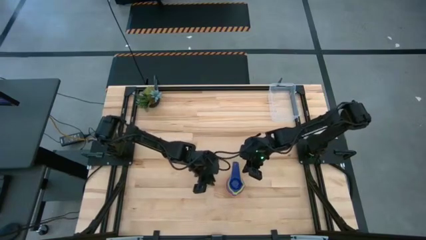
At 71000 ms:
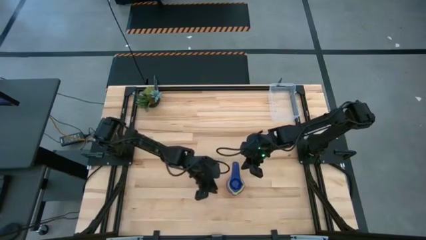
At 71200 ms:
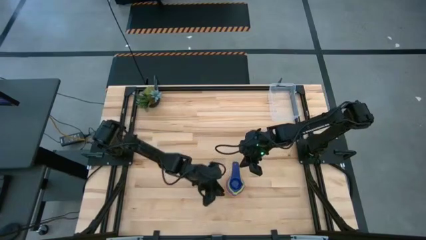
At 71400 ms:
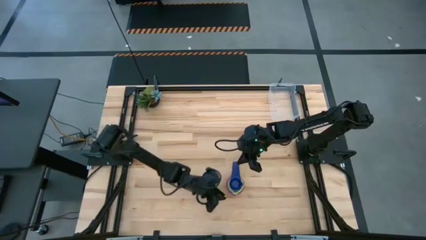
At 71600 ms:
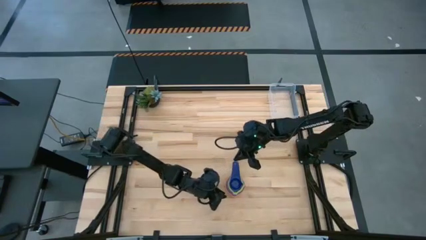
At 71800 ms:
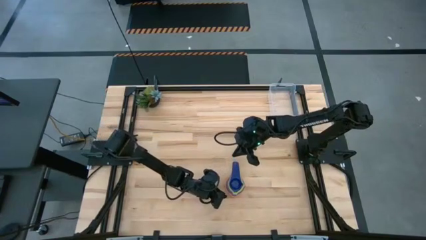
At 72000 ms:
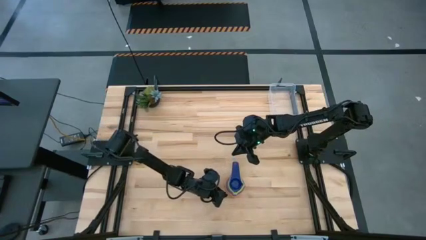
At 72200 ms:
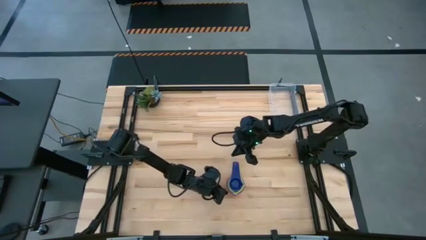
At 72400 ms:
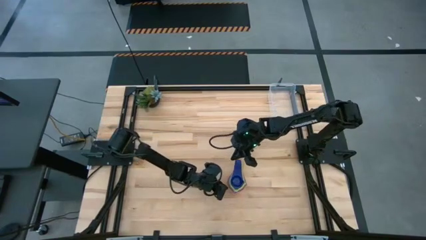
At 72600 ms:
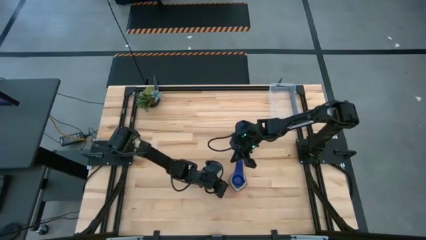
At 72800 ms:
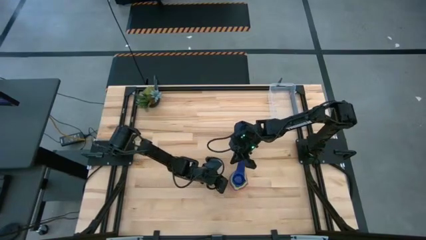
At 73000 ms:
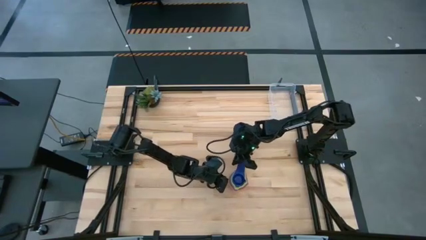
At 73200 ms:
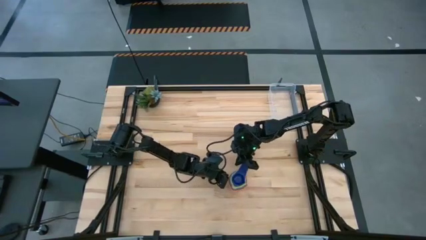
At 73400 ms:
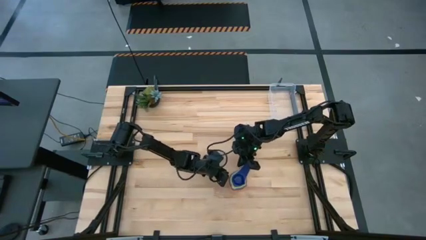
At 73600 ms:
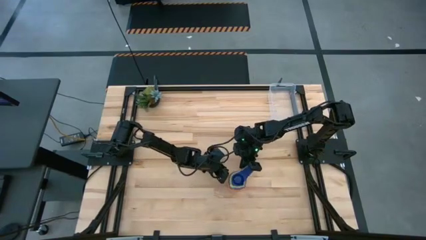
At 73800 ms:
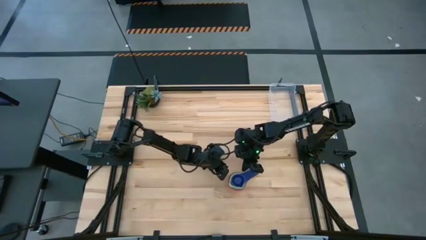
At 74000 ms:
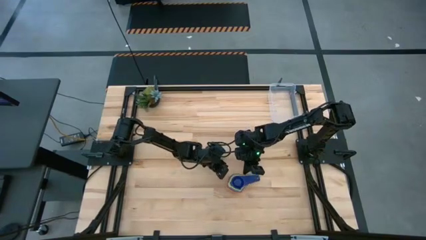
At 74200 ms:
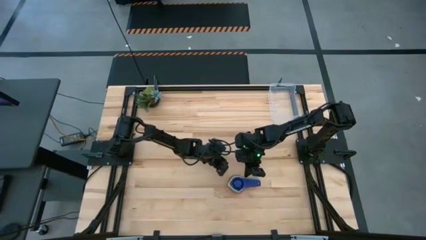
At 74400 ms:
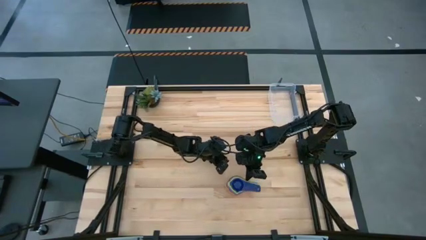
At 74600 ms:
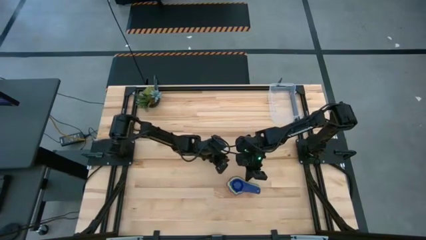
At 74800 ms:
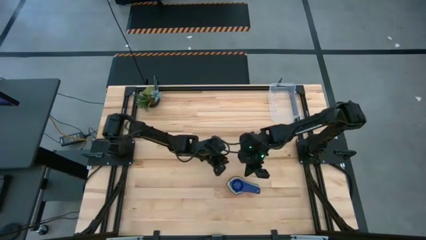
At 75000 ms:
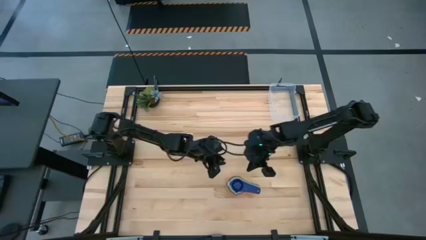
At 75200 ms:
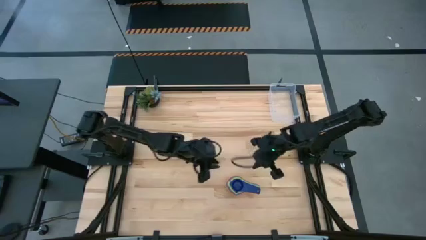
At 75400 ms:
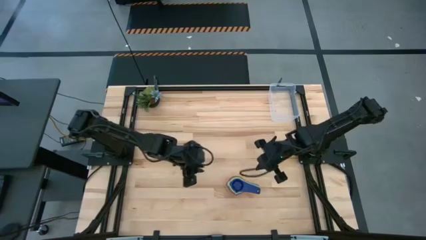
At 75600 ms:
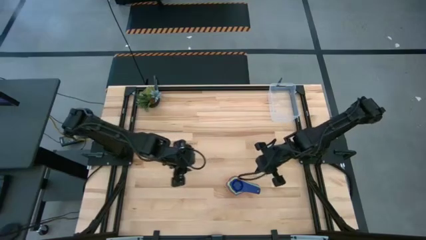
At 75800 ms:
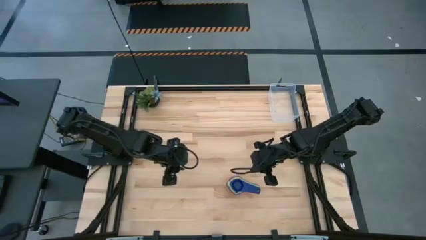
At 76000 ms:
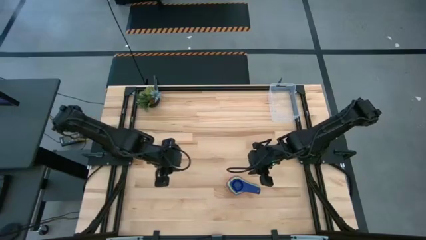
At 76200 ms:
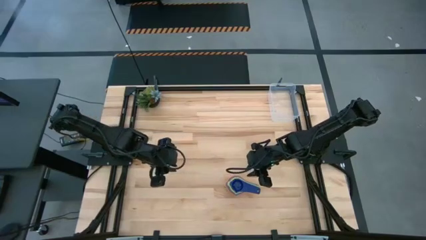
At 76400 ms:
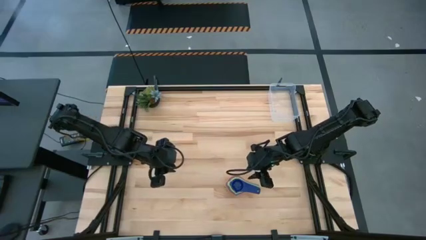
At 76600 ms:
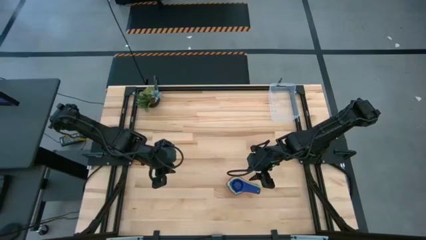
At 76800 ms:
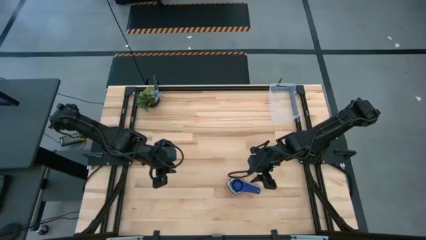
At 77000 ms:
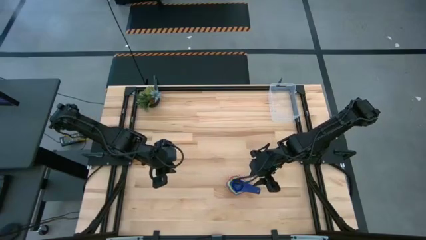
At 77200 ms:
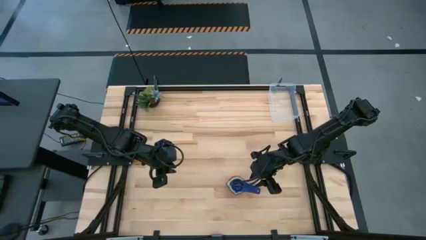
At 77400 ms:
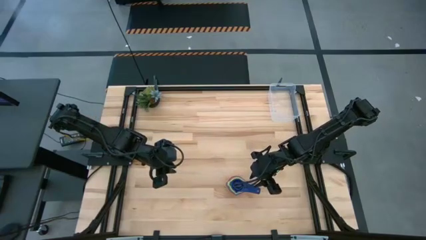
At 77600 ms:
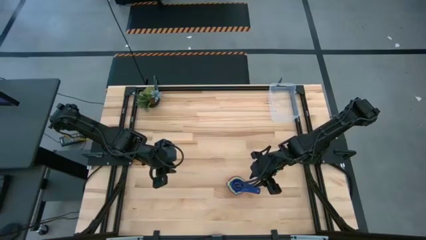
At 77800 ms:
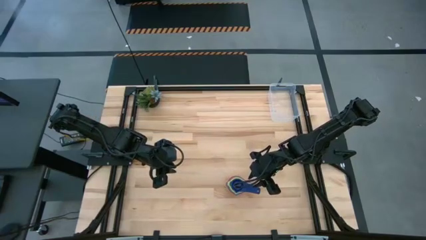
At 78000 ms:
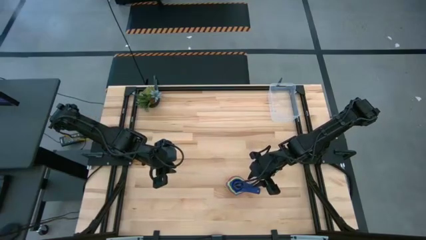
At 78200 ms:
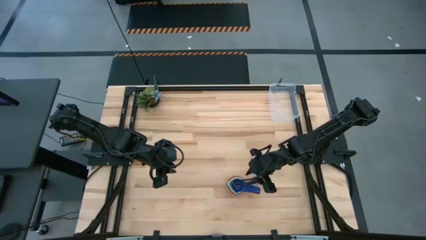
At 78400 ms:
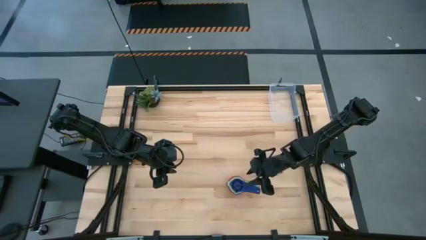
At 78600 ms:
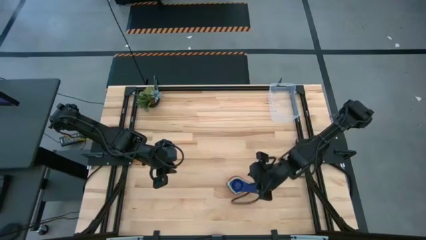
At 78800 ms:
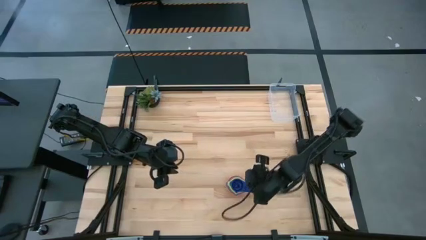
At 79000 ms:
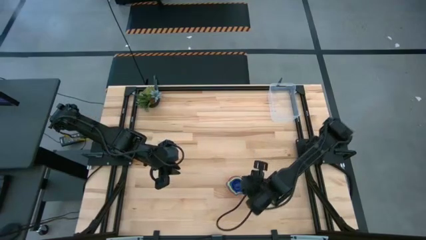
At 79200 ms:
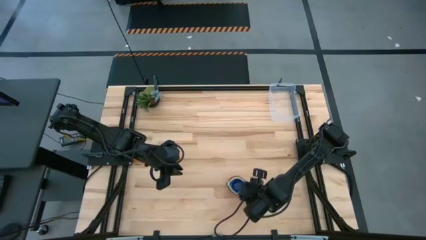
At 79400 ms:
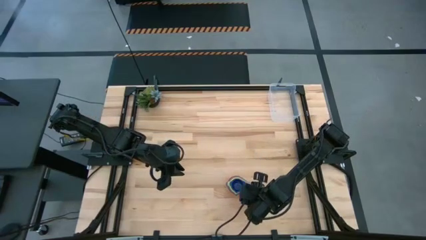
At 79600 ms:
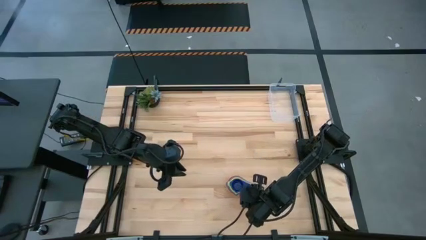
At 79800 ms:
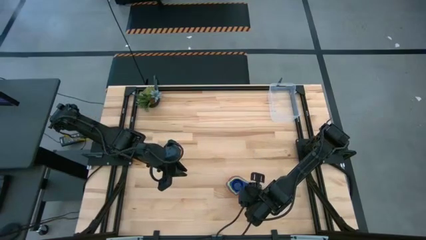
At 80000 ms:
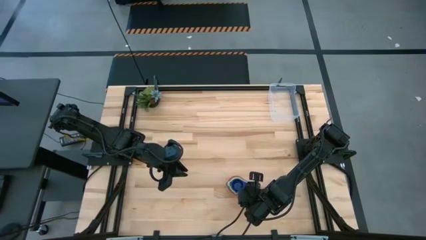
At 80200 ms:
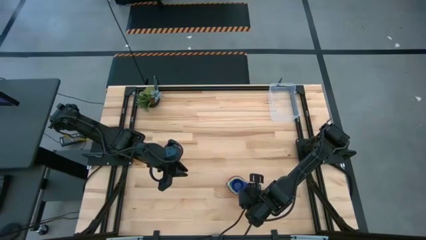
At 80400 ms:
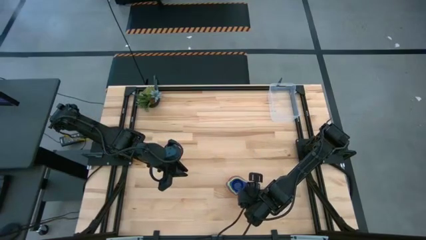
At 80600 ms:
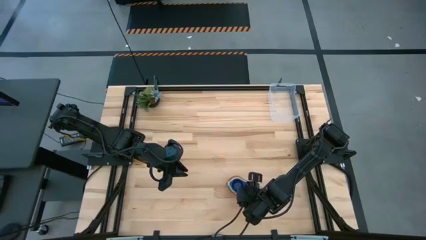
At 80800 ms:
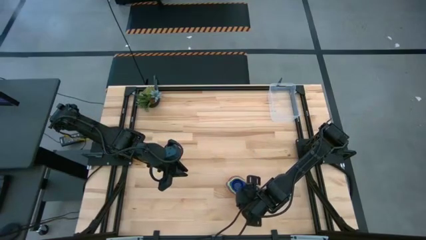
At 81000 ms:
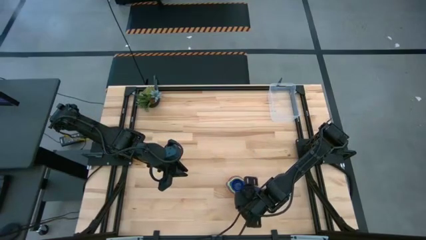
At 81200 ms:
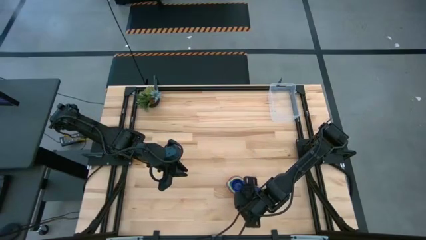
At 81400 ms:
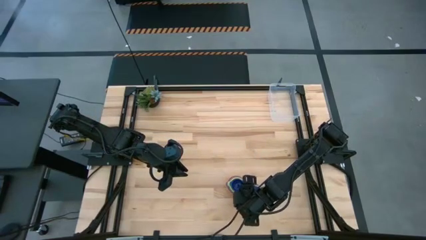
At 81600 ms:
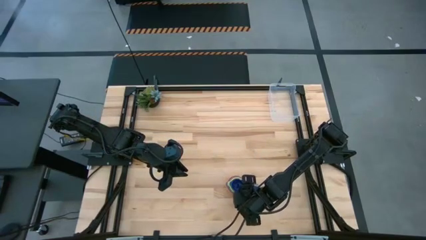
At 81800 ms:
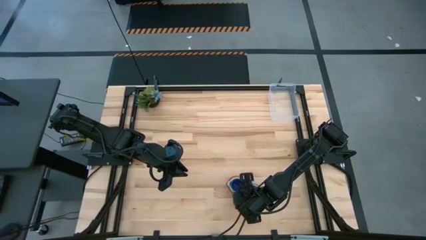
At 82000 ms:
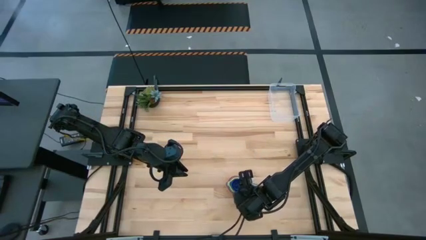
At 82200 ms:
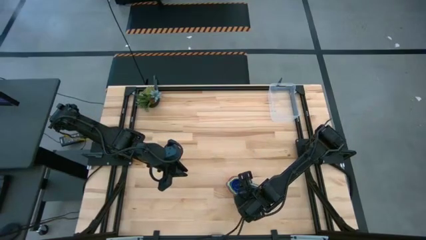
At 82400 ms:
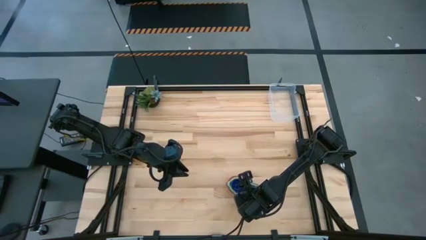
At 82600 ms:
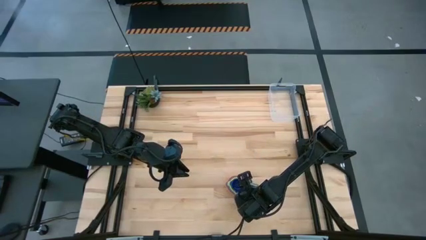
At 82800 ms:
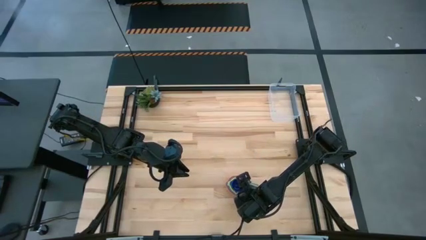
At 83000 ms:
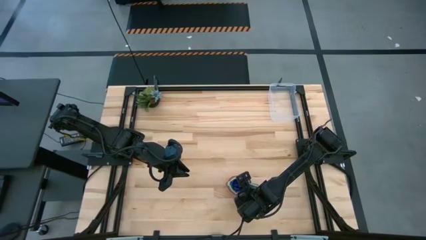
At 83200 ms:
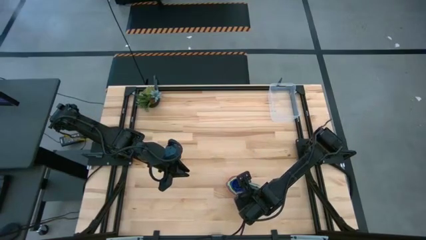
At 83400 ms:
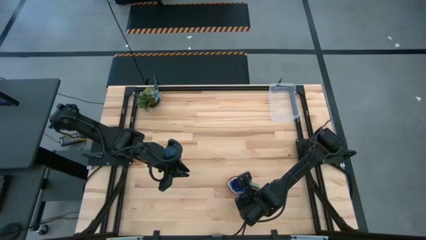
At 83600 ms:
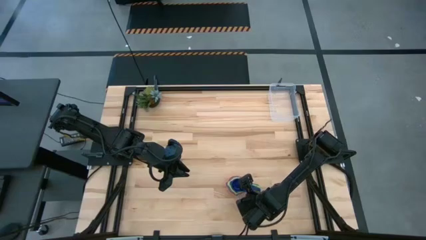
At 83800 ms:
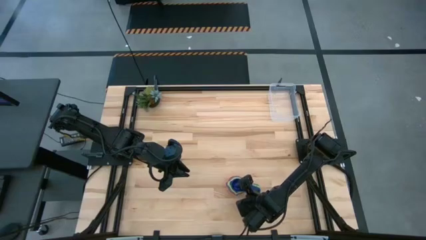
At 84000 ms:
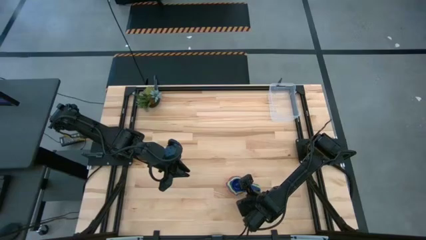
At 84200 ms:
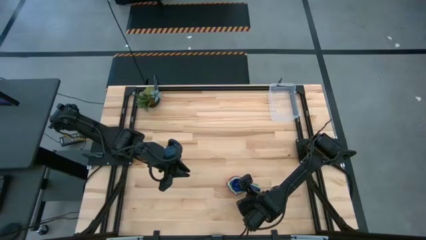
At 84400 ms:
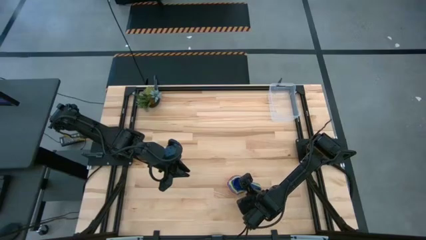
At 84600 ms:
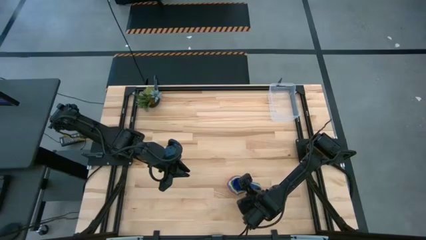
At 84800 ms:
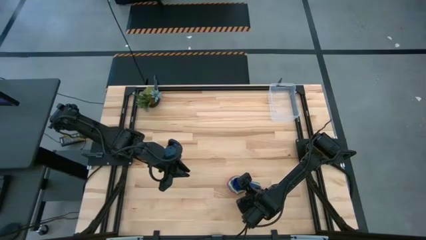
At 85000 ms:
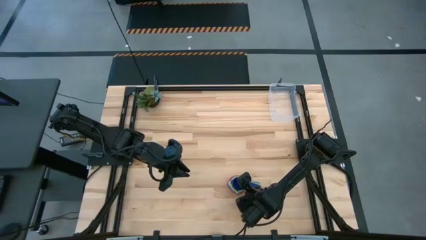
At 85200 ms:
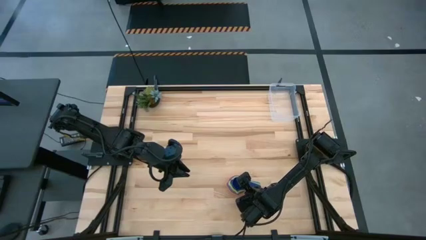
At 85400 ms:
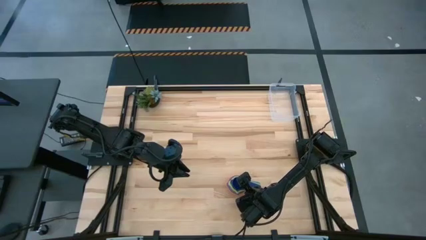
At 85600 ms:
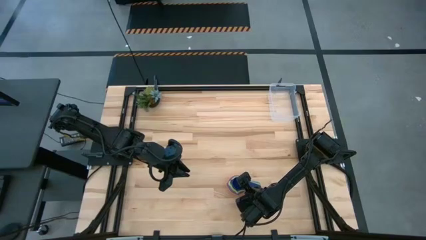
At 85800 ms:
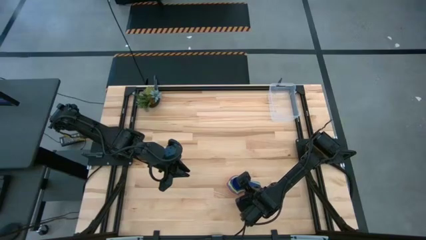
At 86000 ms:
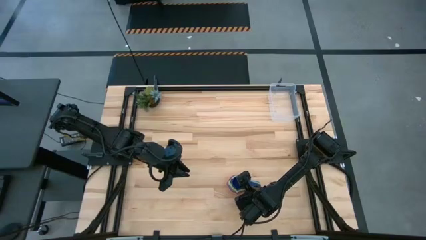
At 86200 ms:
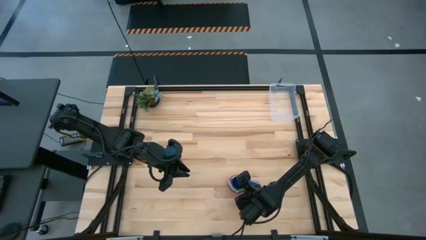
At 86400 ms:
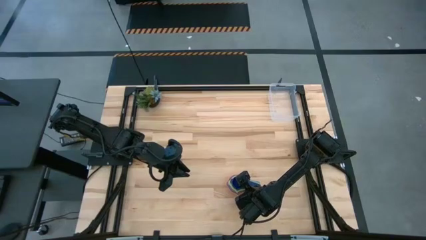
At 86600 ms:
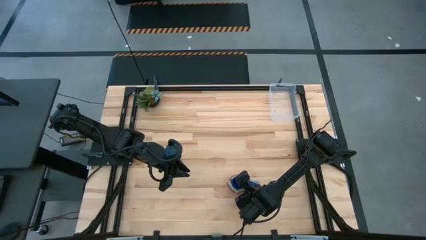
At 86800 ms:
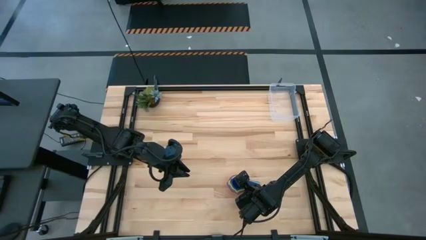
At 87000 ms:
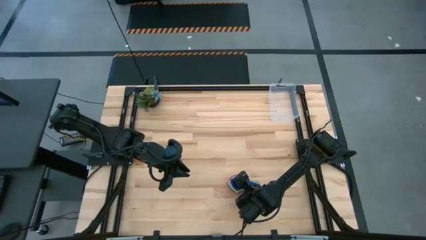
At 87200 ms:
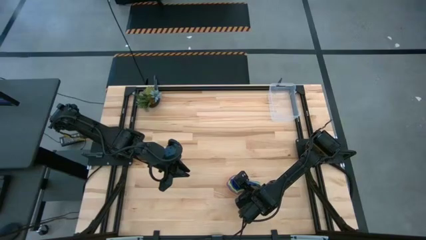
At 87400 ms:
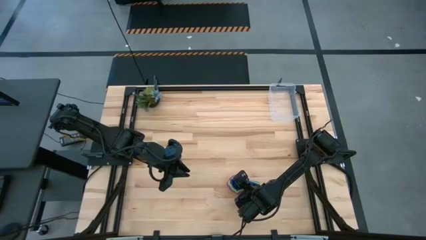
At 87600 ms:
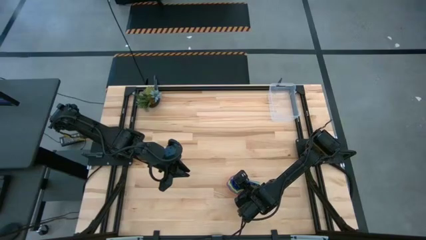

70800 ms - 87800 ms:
Task: Nest measuring cups in basket
Put the stacked measuring cups into the bin
